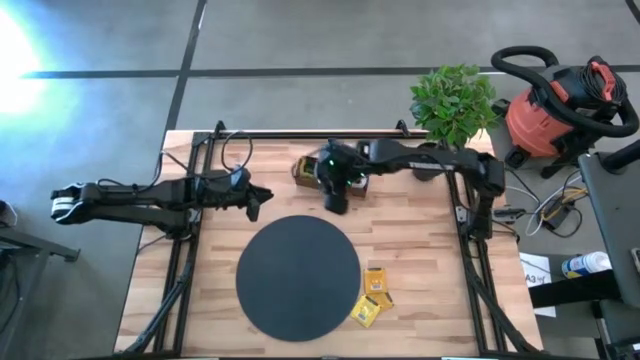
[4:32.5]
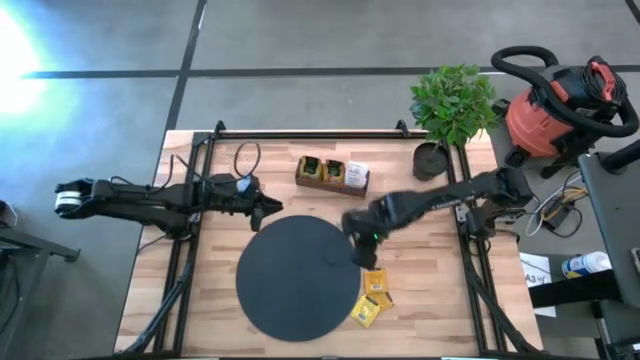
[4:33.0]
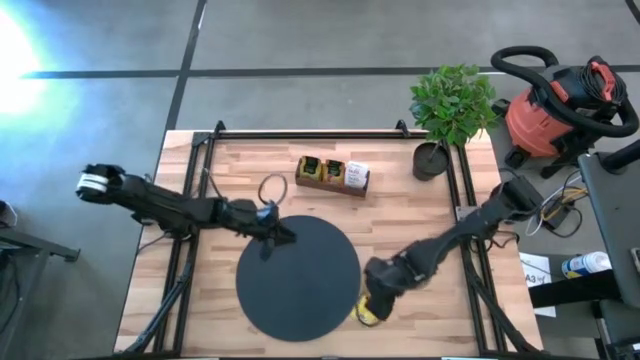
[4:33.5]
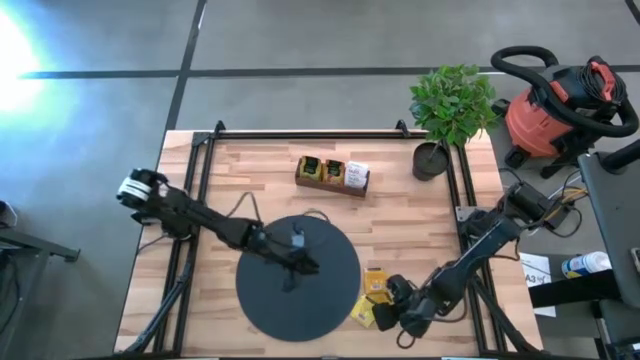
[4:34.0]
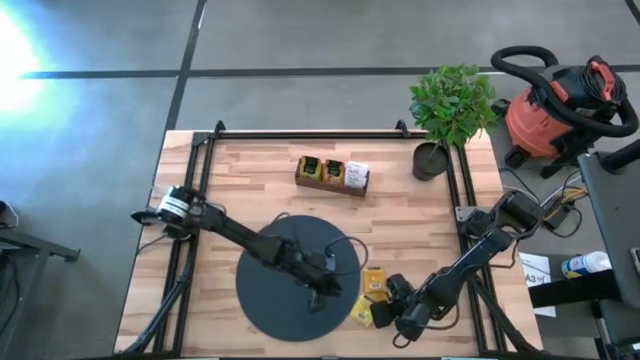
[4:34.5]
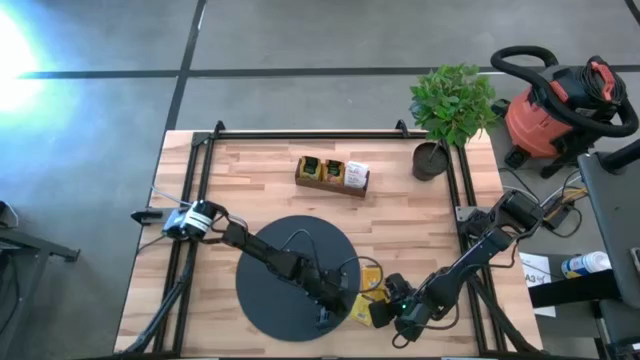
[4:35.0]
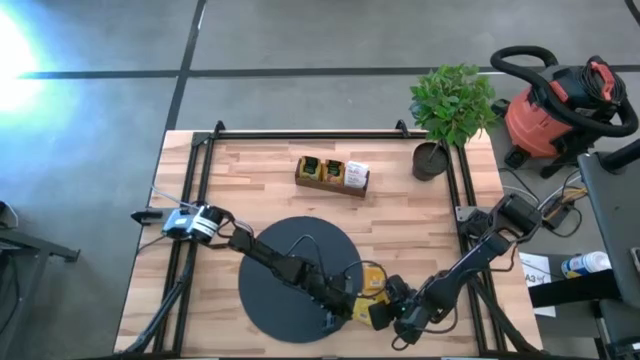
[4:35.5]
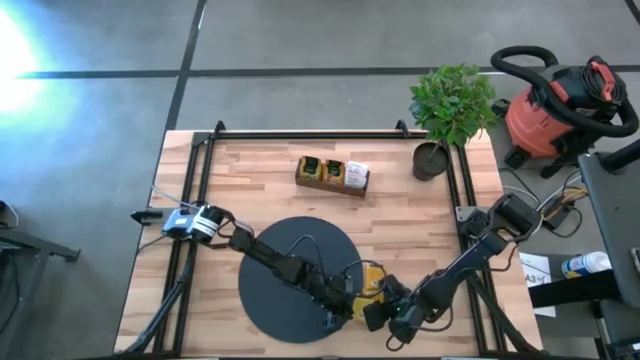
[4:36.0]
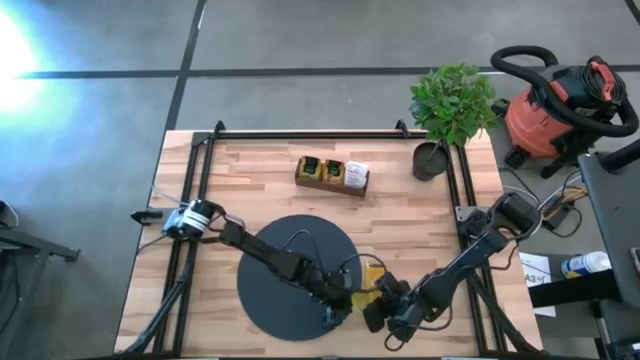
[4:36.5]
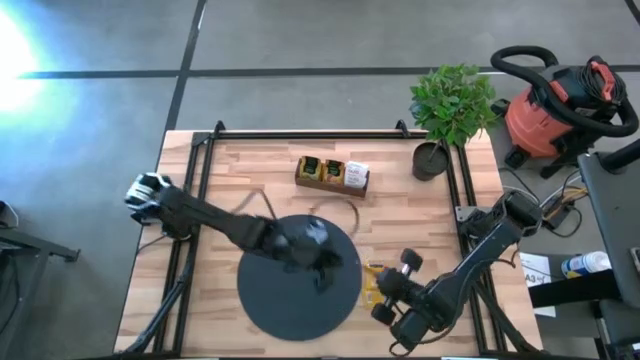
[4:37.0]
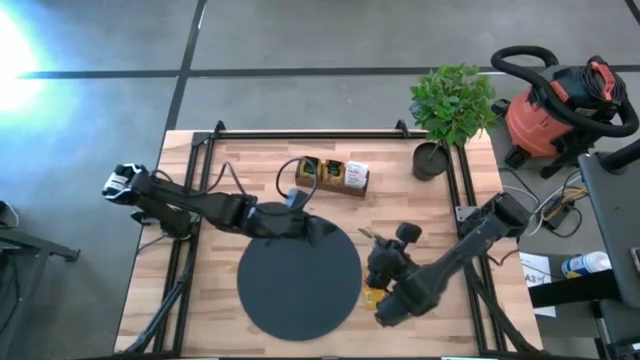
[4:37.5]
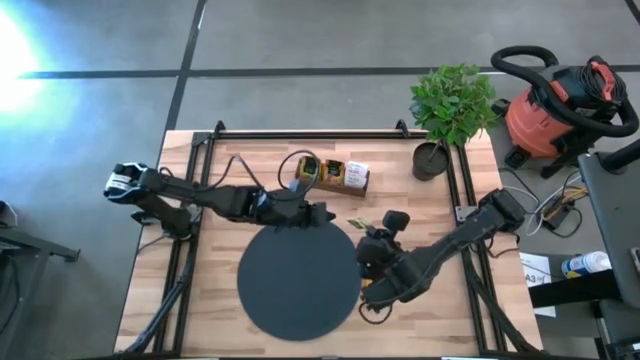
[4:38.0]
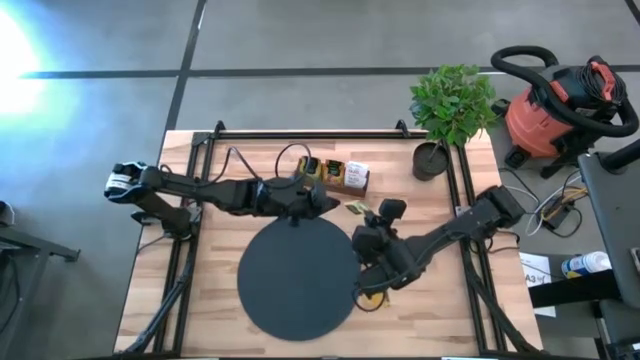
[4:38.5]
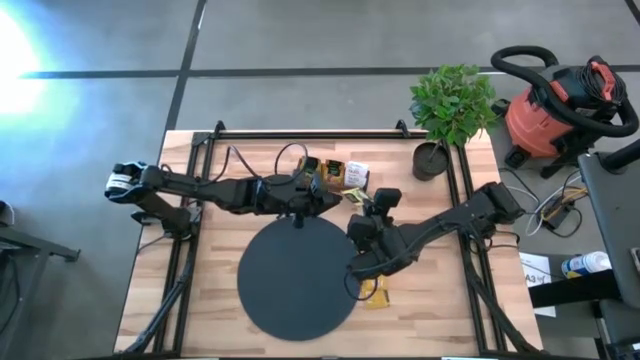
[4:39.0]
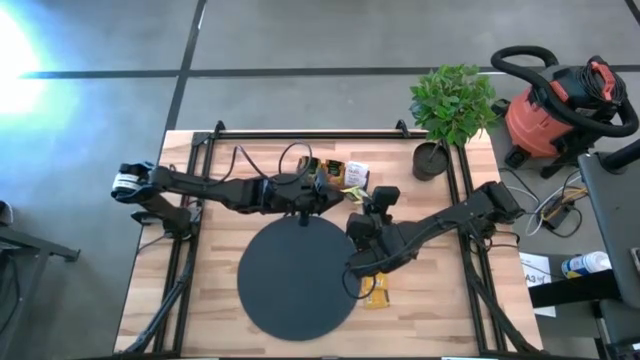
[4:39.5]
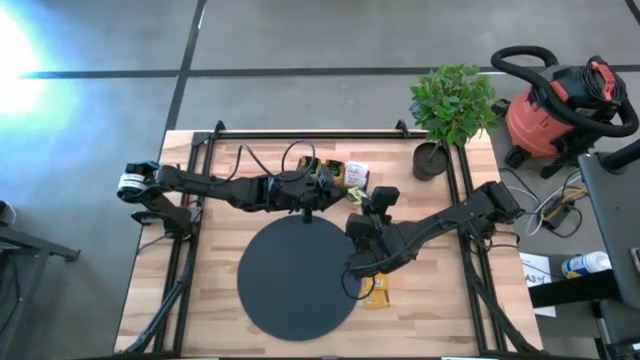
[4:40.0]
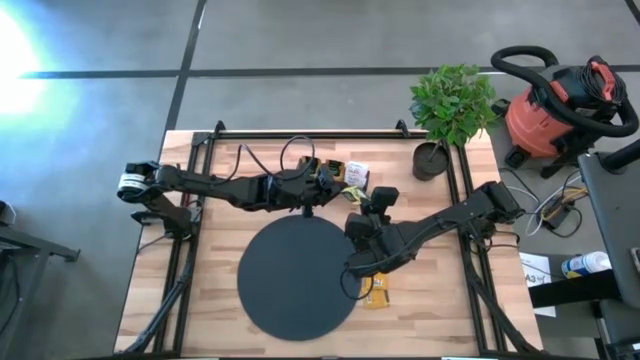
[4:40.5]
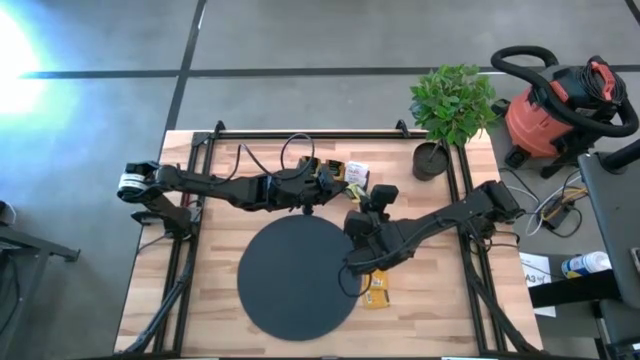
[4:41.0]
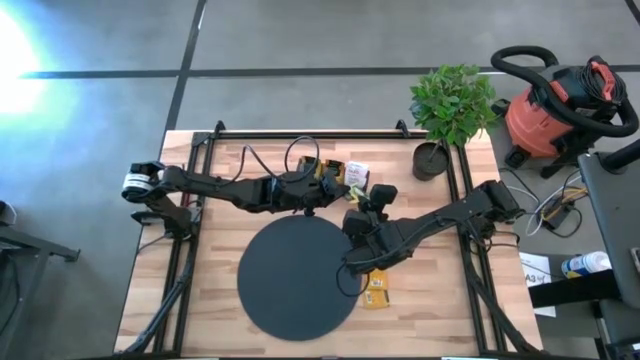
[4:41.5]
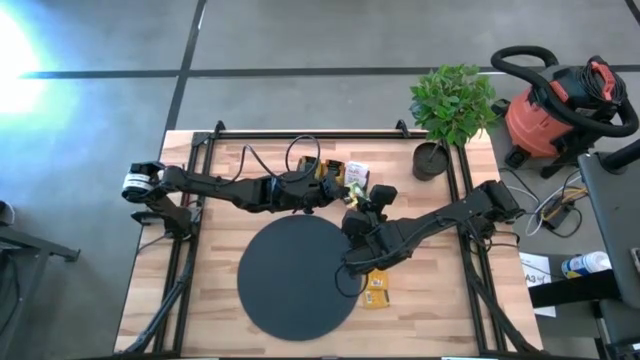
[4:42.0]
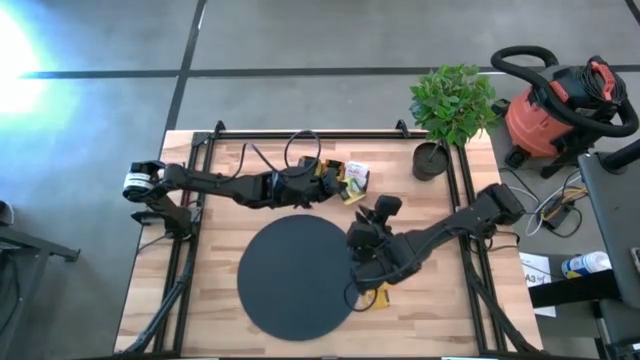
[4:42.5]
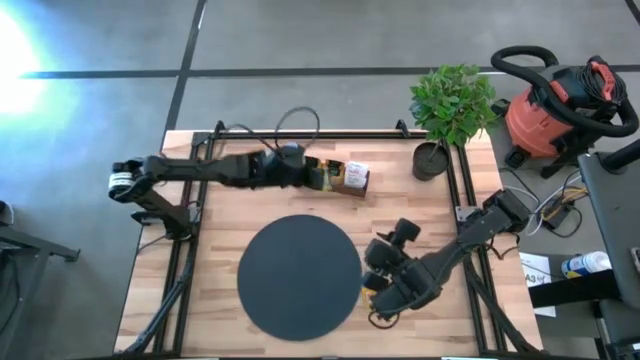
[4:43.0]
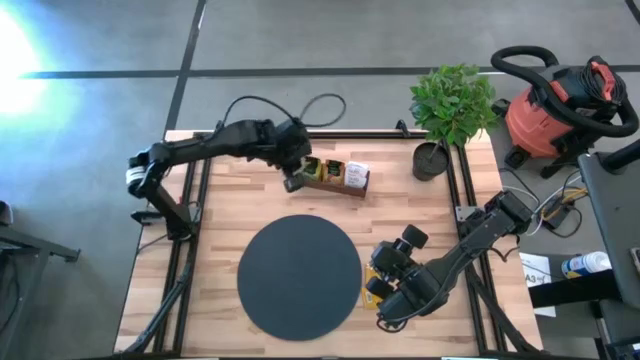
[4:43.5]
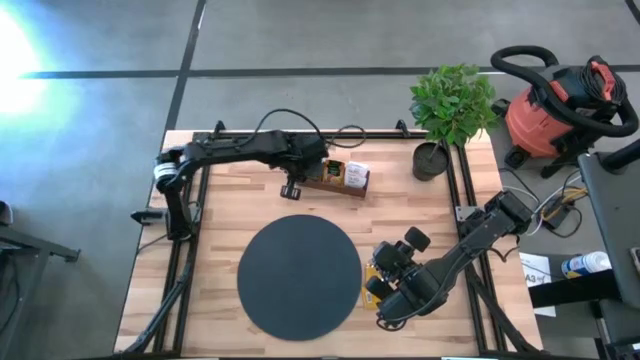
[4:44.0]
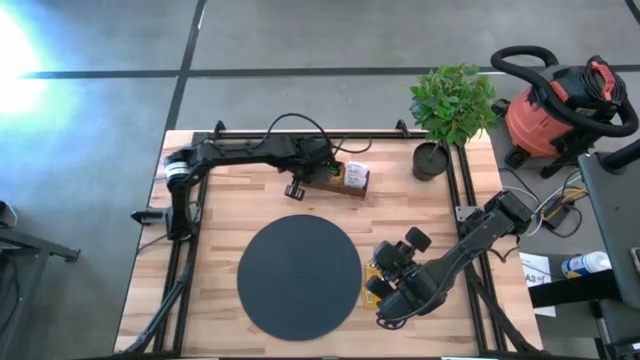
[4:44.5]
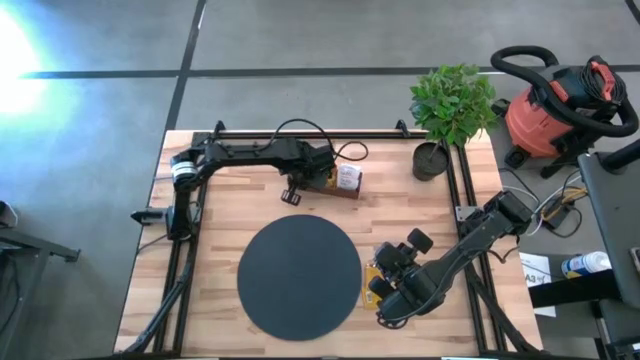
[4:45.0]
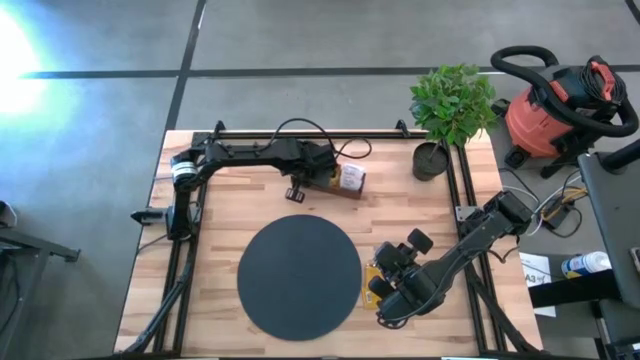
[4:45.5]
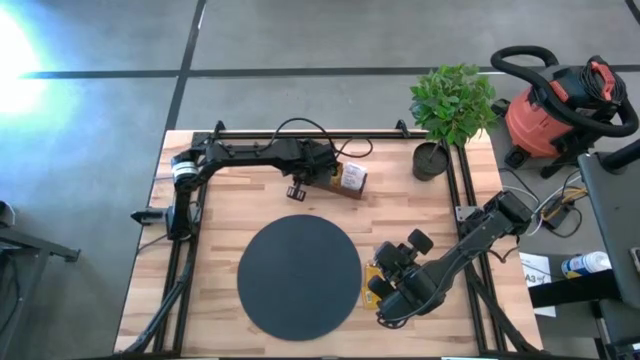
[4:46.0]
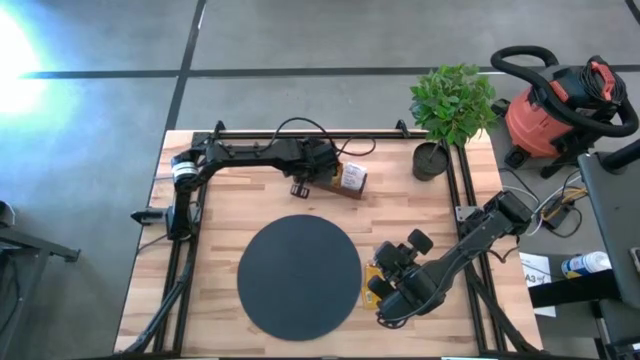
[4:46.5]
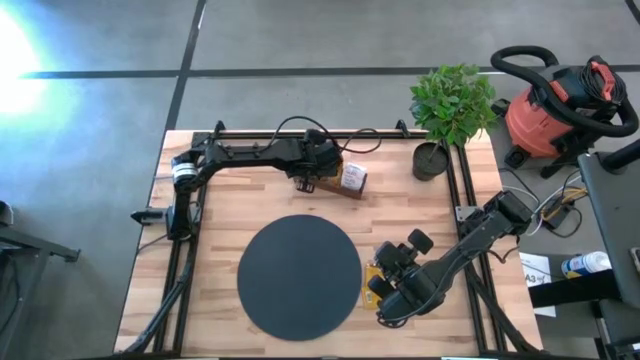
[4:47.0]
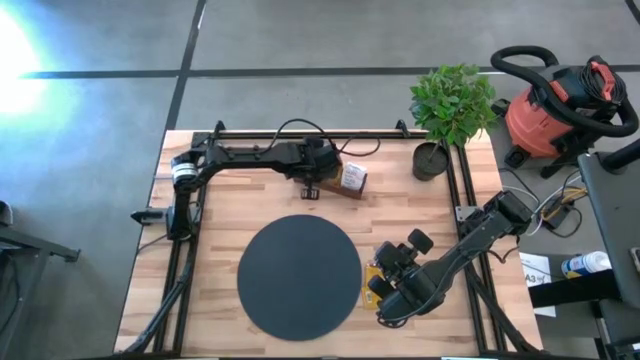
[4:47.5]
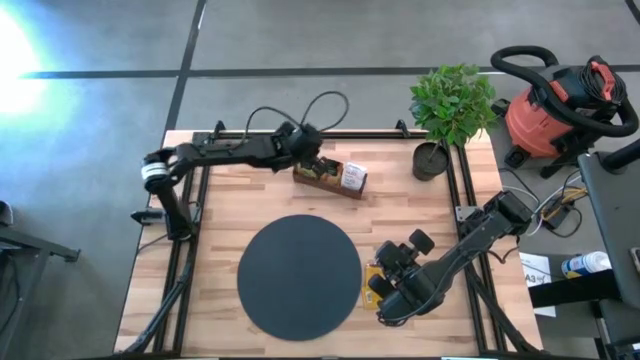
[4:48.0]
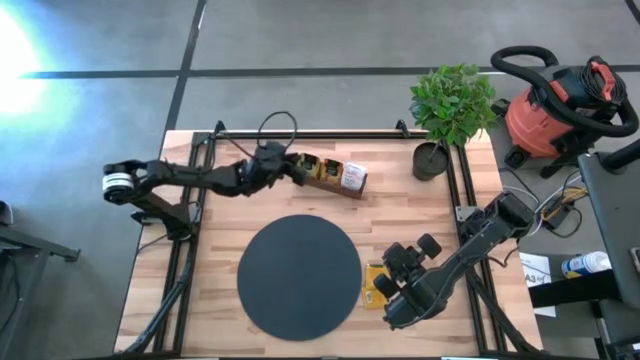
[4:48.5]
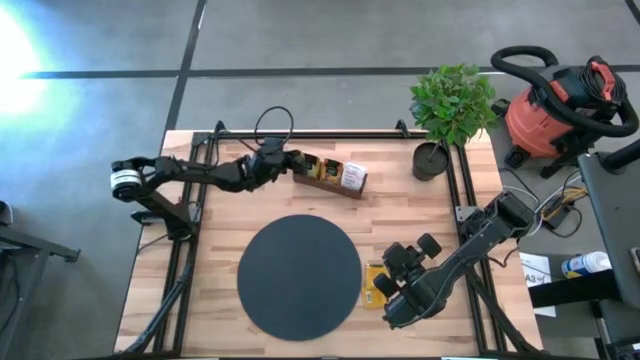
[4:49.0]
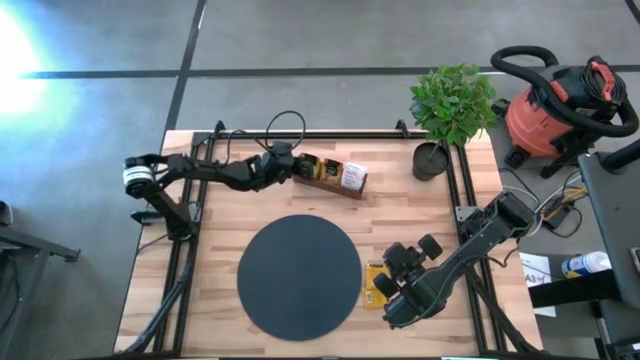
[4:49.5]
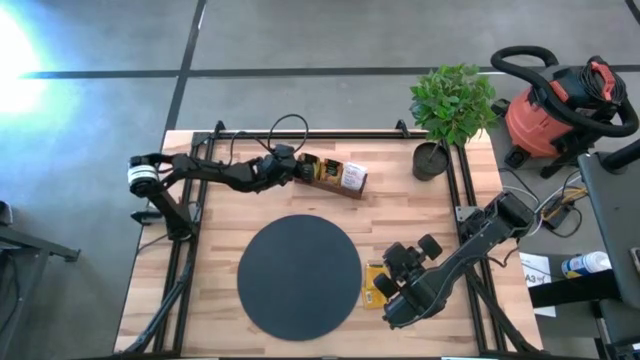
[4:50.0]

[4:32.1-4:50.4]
Task: Pick & Place Tea
Put the yellow tea bag into the left section of the wooden organizer

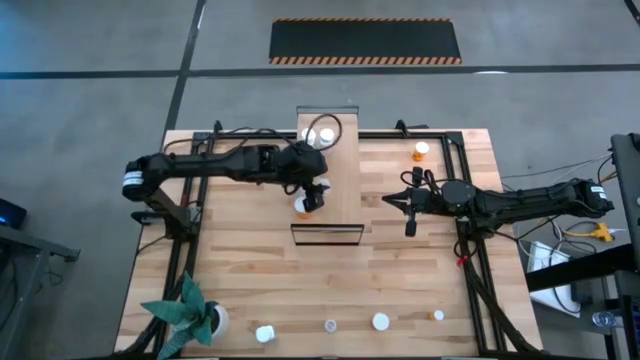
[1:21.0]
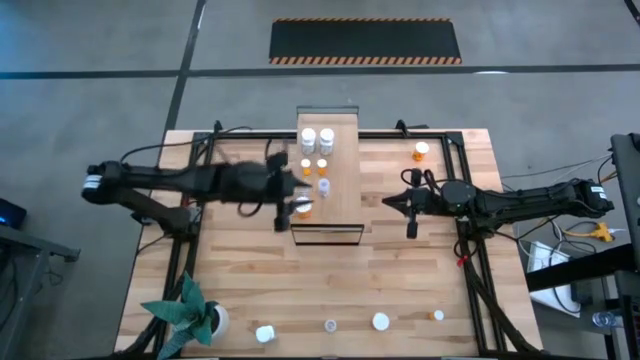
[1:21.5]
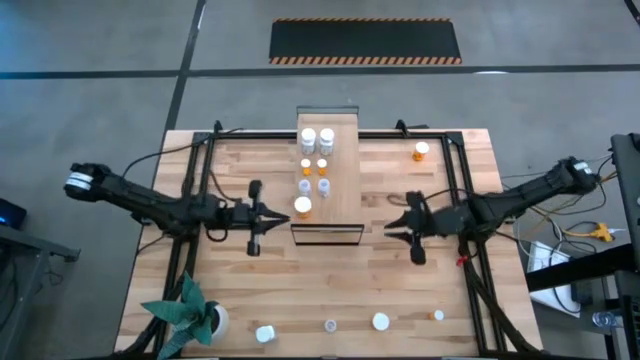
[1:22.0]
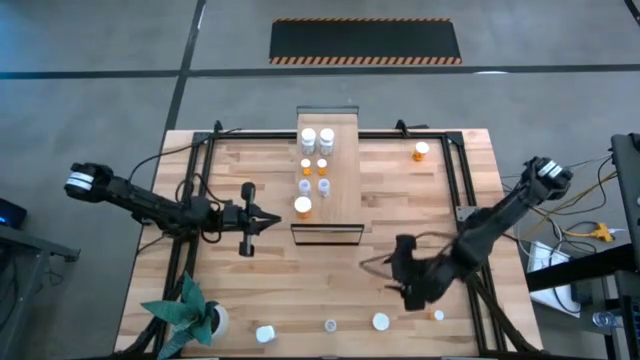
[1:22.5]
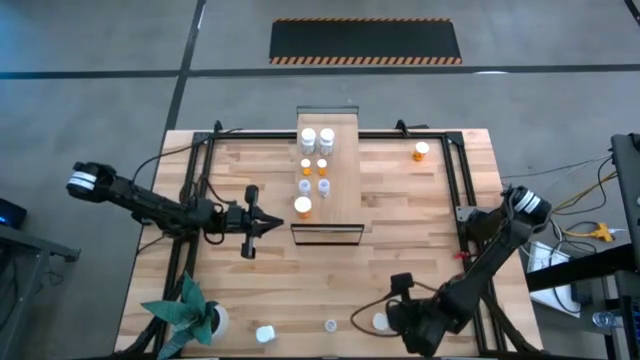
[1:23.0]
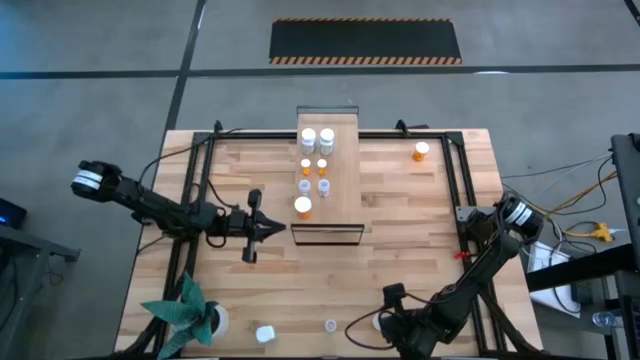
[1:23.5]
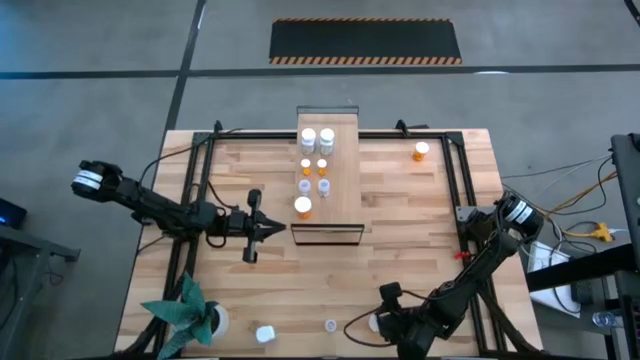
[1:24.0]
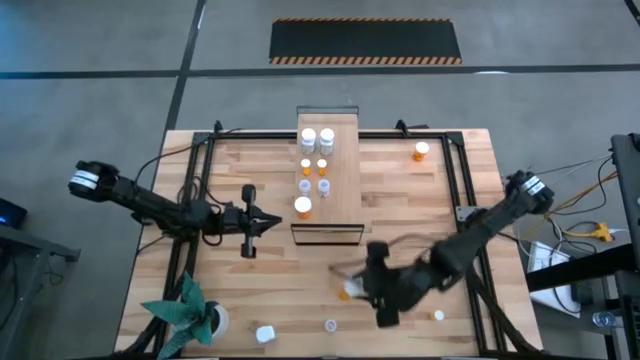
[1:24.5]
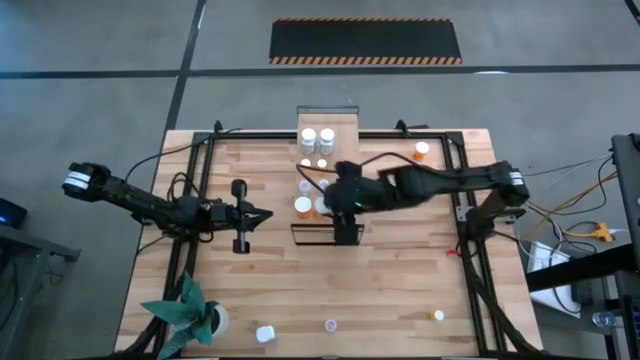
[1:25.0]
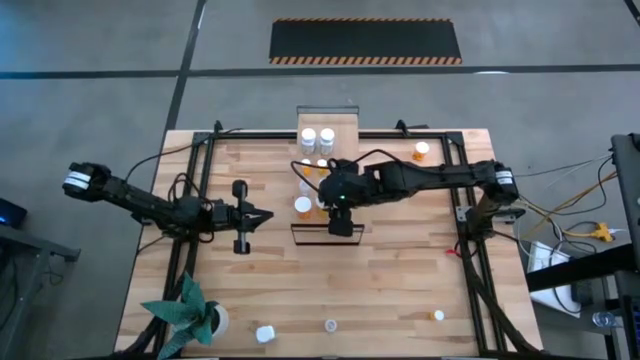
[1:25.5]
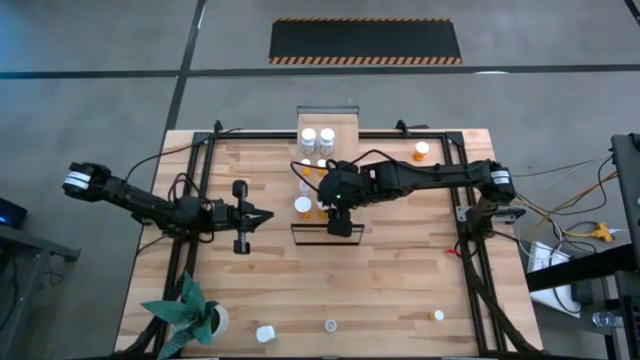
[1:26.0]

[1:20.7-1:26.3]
Task: Pick and place medicine bottles onto shelf by color
Put the bottom big orange pill bottle aligned with the other big orange pill bottle on the shelf
